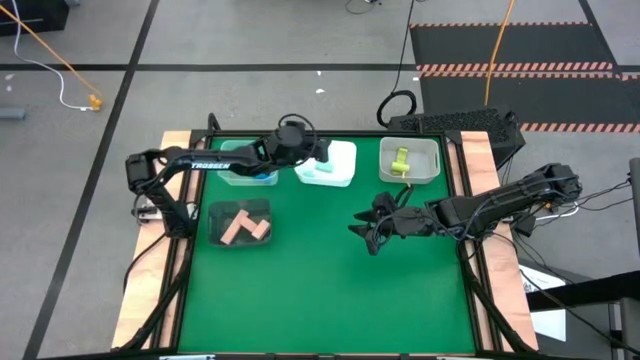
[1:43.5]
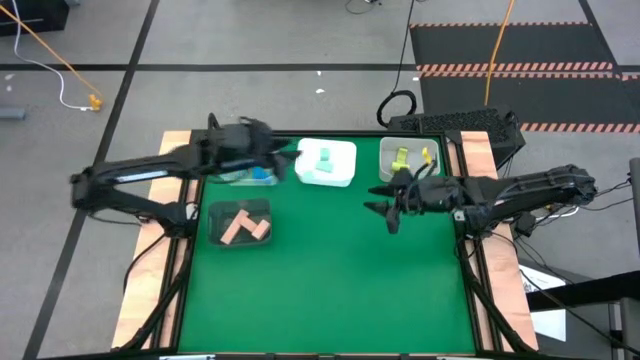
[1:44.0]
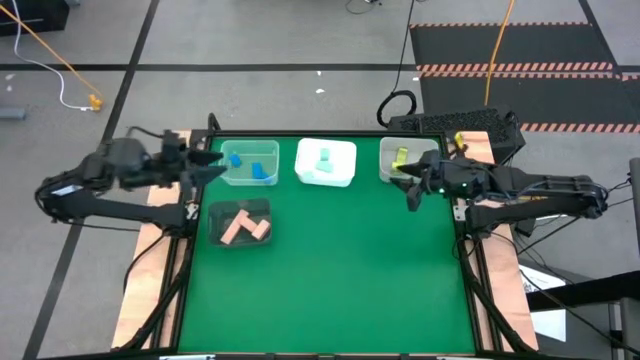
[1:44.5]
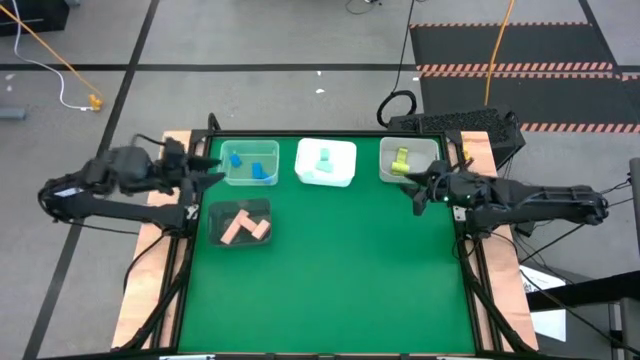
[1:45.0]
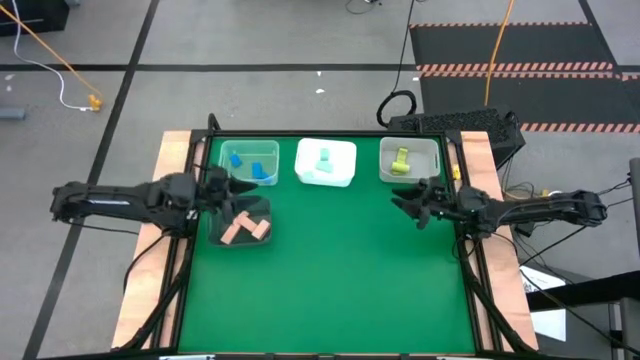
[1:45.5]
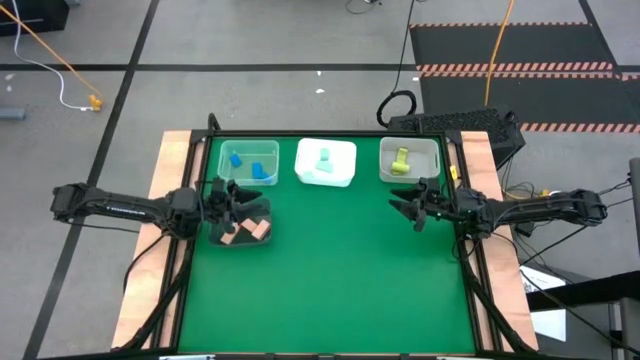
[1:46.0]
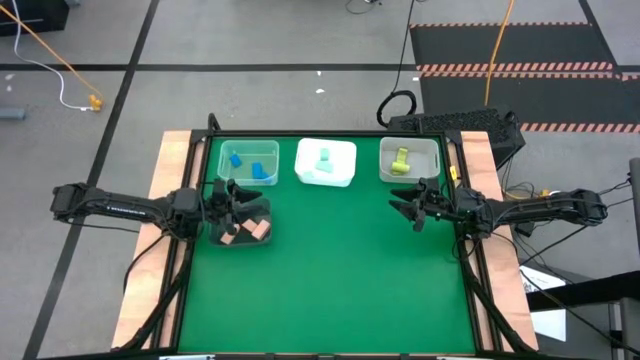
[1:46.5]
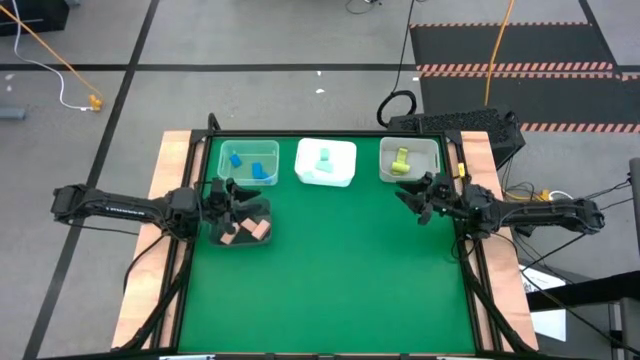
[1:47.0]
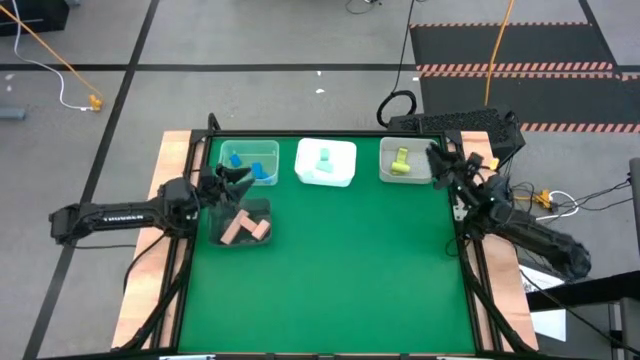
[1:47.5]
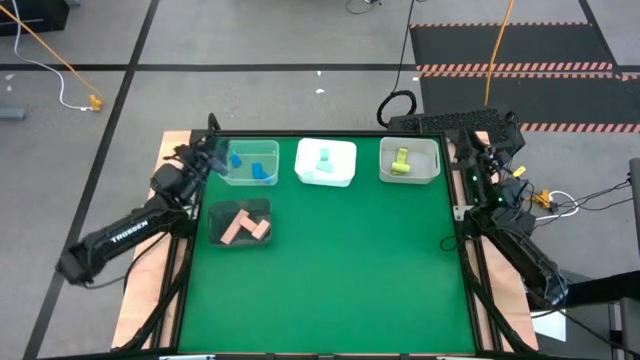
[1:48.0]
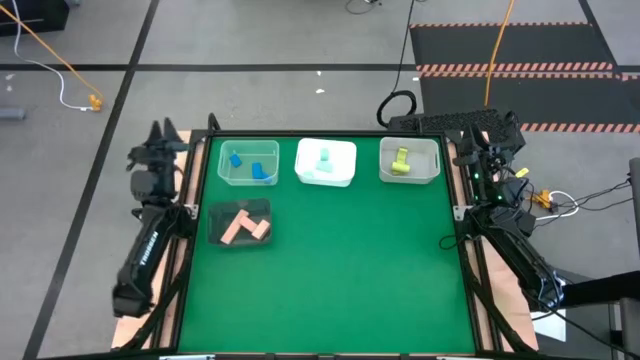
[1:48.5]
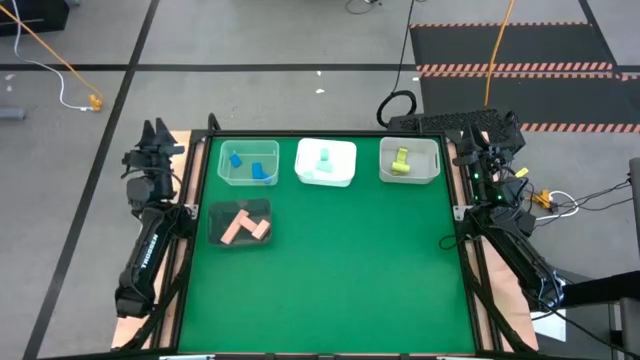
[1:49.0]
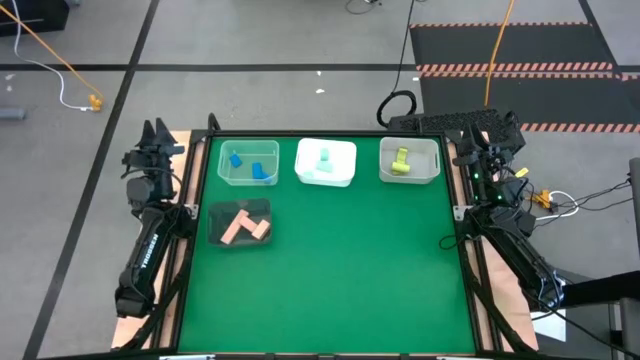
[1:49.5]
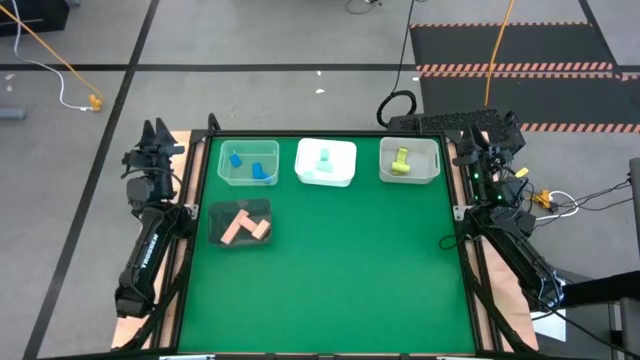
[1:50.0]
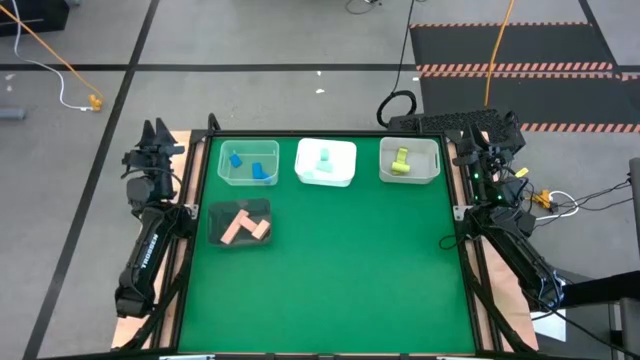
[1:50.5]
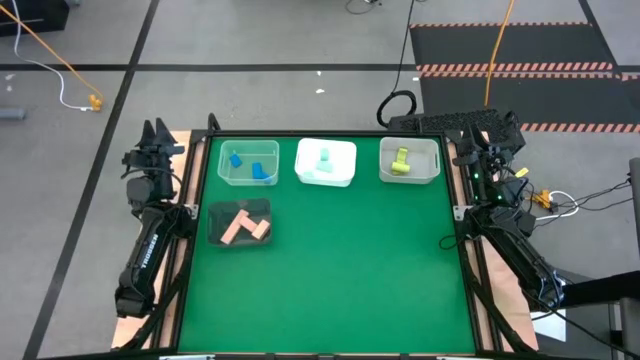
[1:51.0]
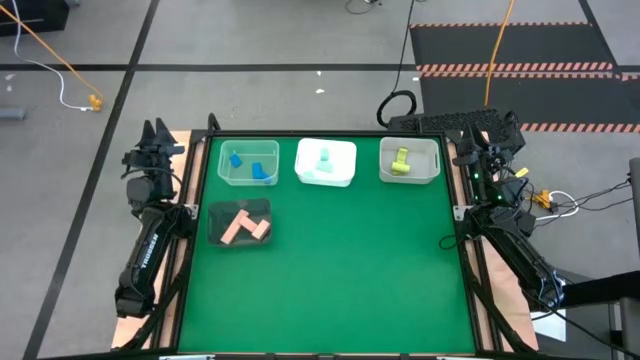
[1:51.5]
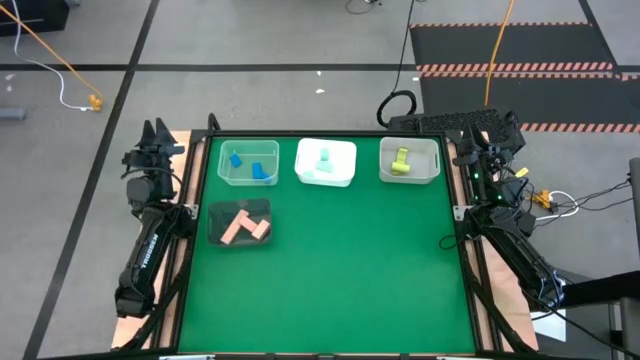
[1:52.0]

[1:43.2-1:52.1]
Task: Sort & place blocks by color
Return to Home Position

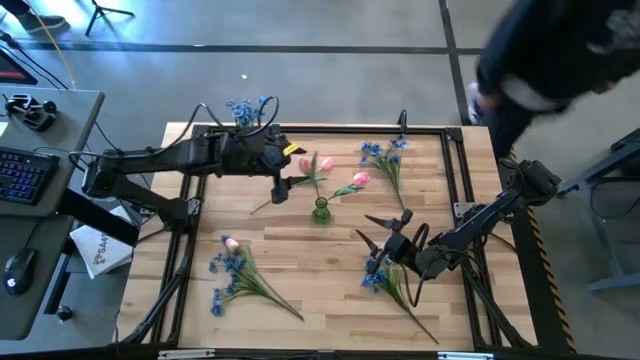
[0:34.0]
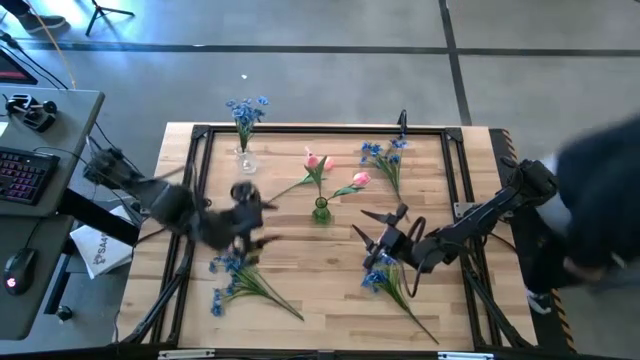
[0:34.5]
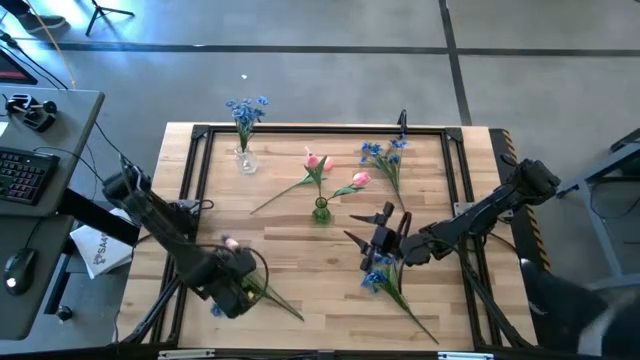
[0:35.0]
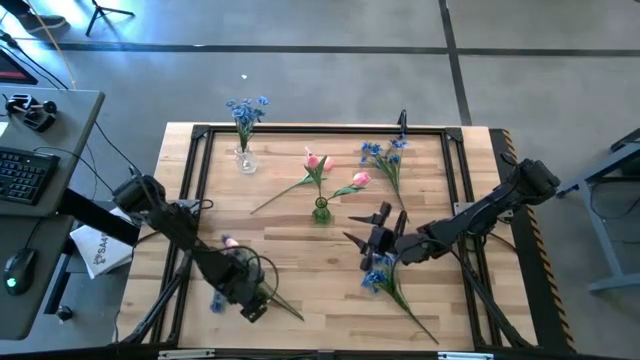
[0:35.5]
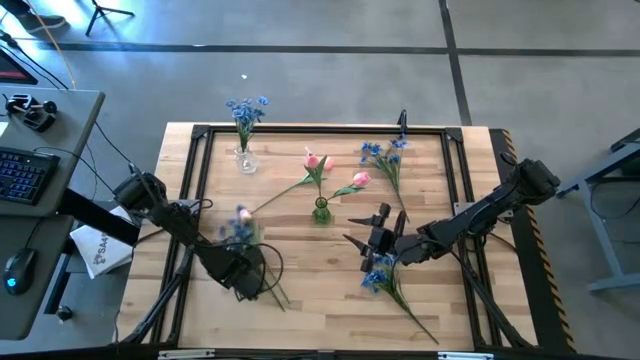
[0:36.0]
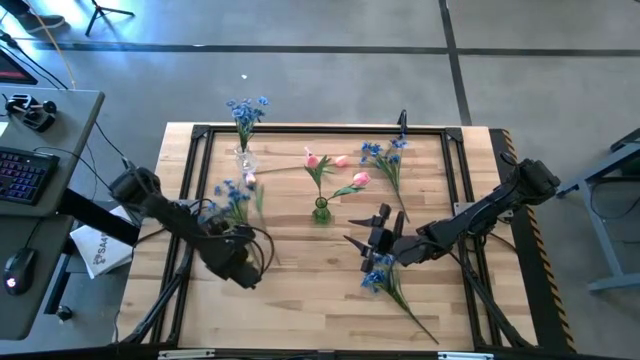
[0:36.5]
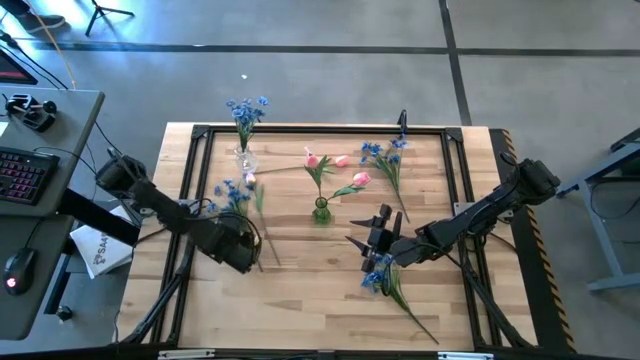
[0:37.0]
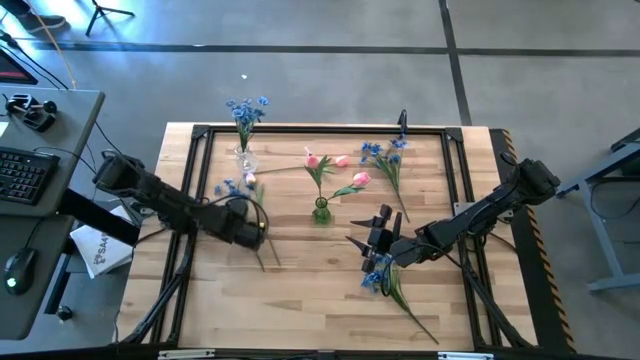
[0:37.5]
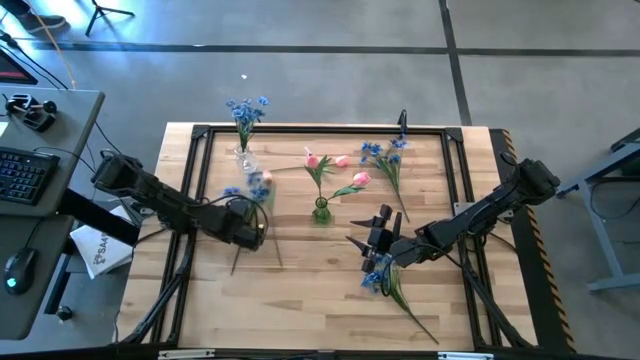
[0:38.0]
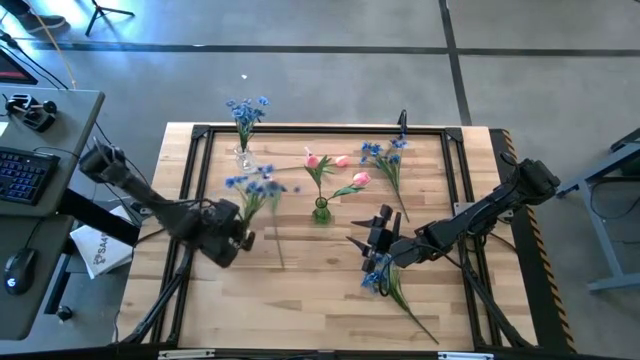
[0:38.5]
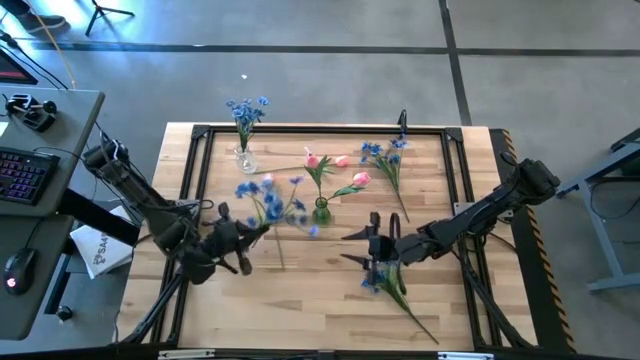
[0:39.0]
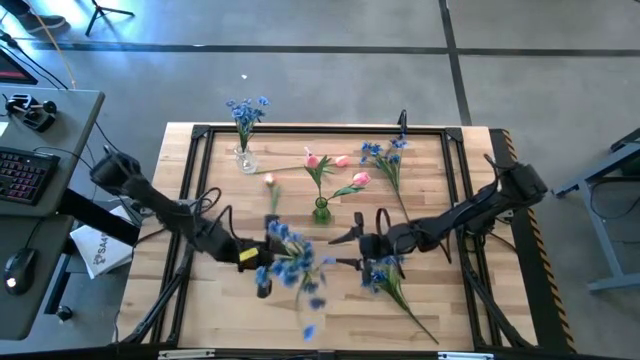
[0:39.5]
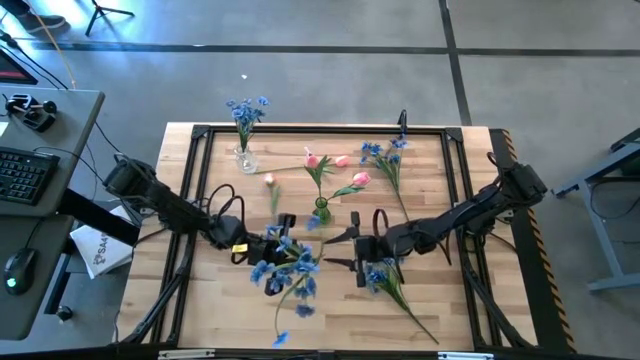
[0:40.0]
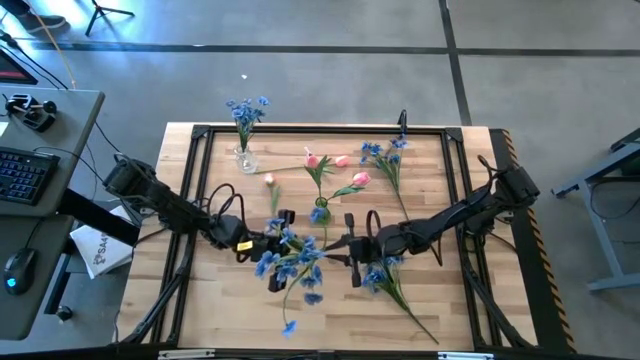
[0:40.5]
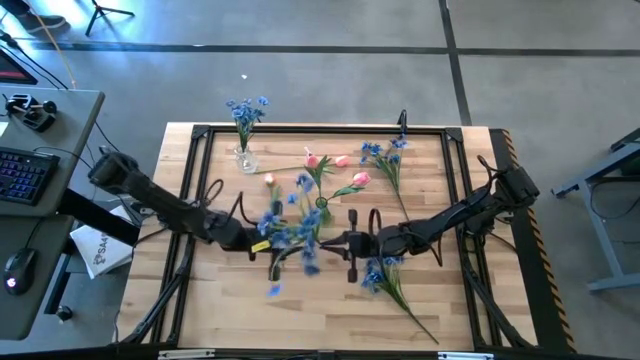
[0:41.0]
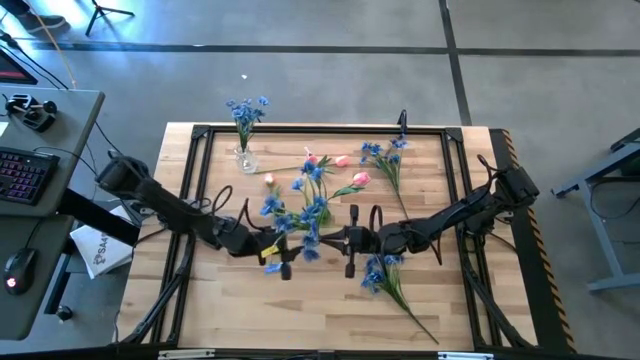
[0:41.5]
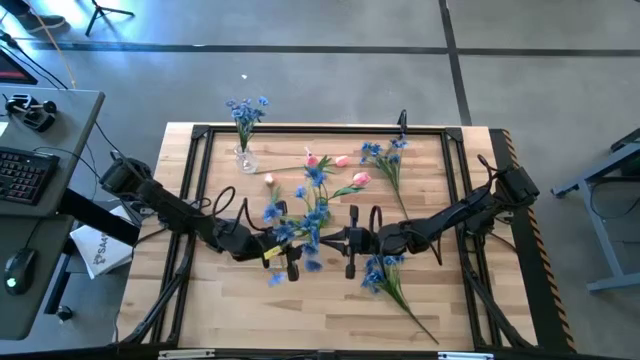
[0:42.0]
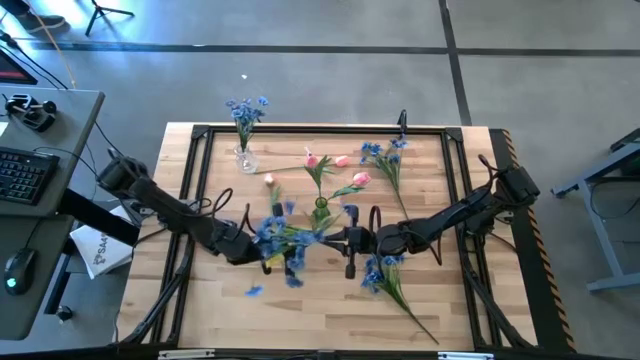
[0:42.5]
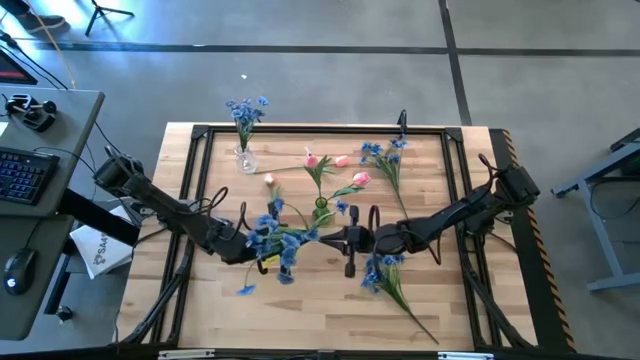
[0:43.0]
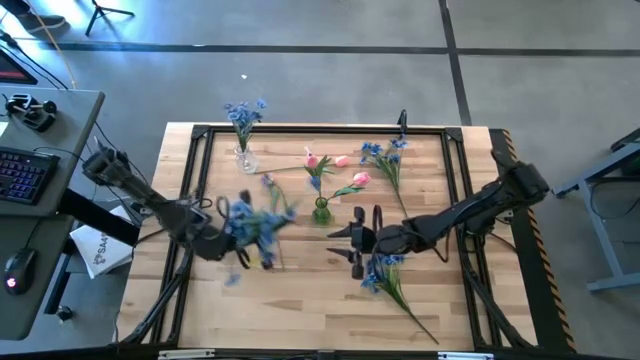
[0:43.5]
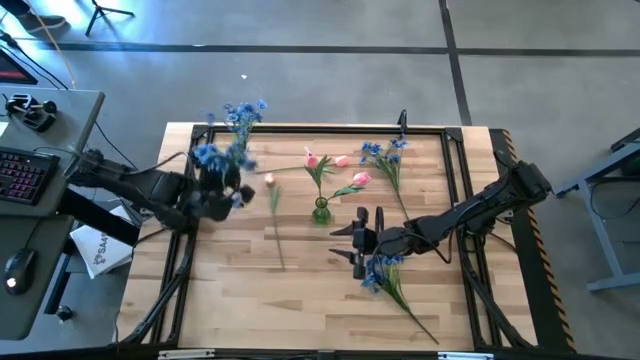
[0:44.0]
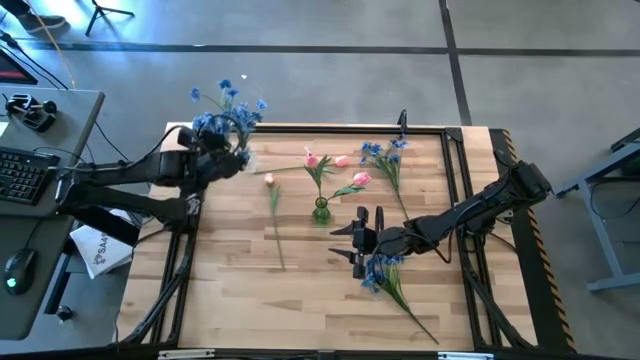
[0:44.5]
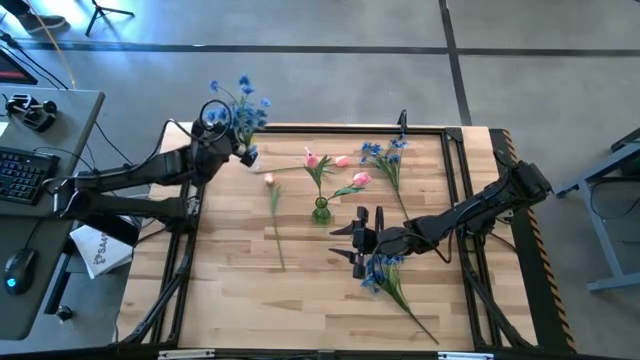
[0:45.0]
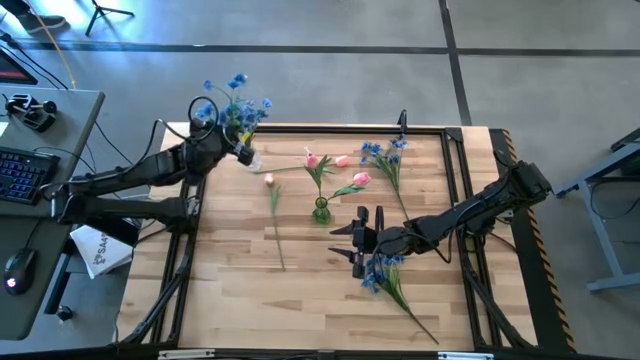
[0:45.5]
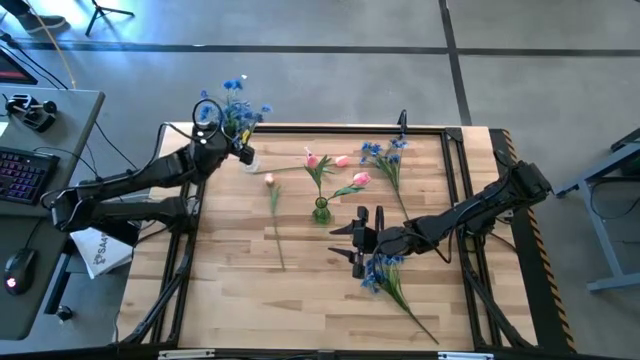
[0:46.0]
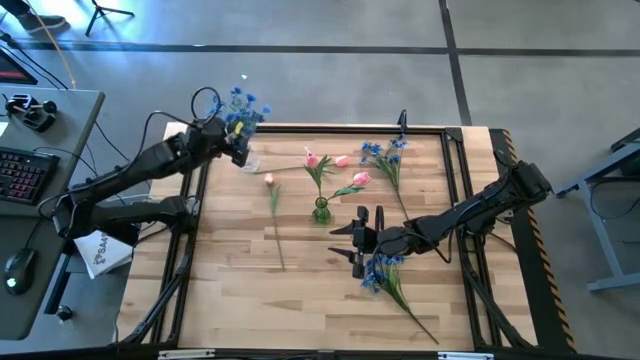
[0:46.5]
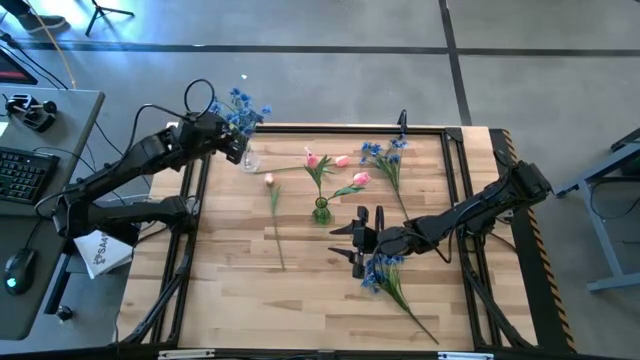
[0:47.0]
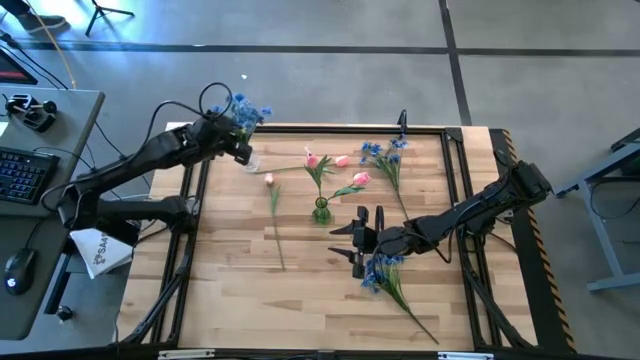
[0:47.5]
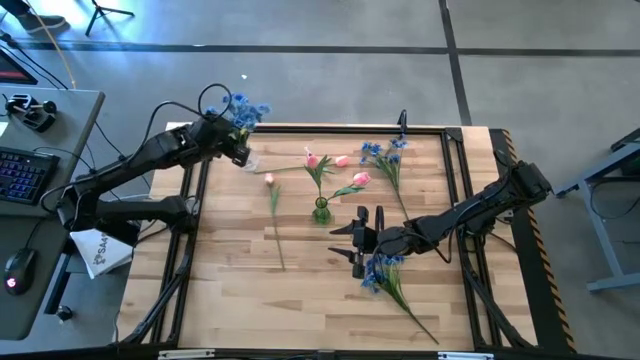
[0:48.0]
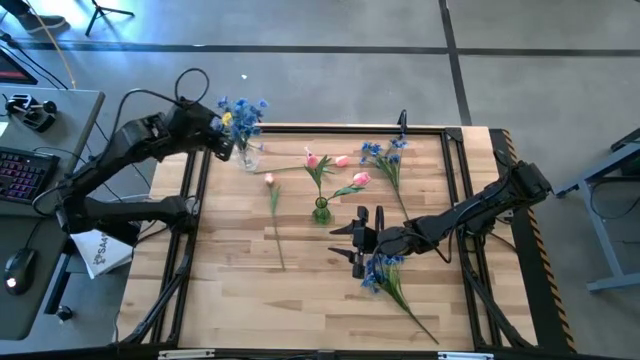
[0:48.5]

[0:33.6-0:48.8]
Task: Sort flowers into vase by color
Put the blue flowers into the transparent vase
